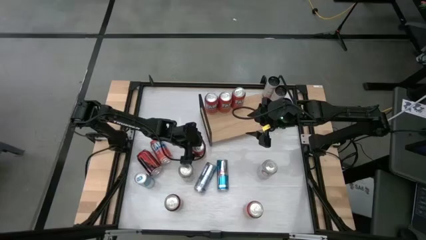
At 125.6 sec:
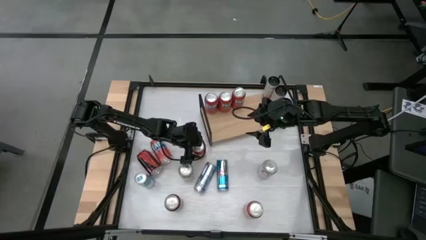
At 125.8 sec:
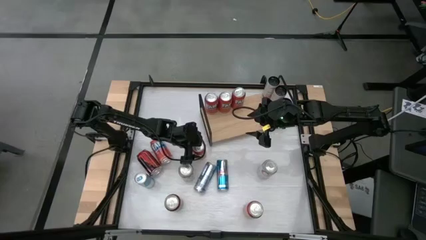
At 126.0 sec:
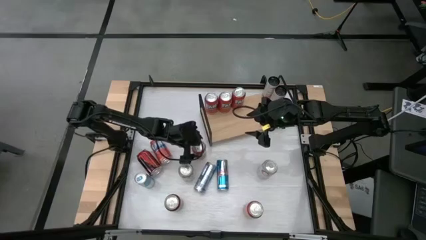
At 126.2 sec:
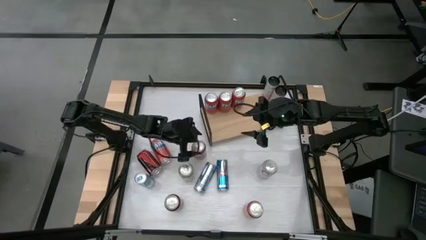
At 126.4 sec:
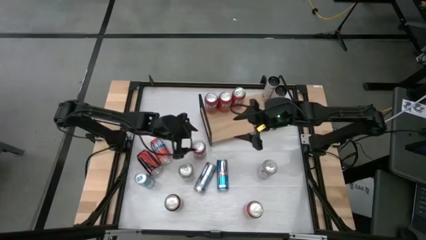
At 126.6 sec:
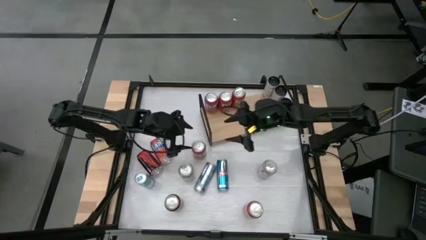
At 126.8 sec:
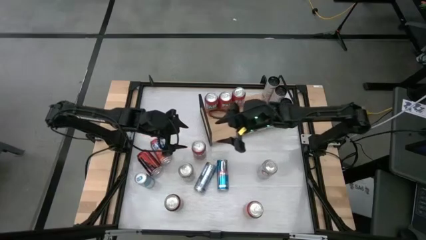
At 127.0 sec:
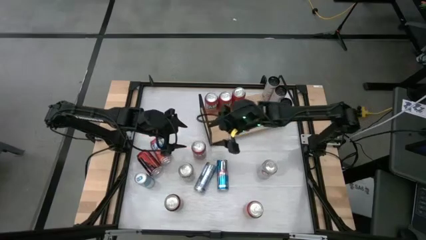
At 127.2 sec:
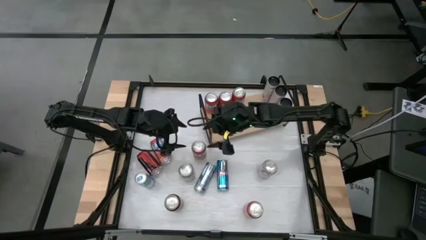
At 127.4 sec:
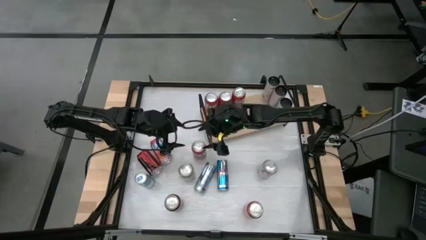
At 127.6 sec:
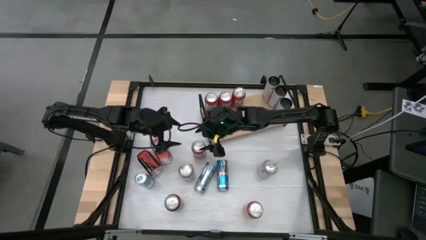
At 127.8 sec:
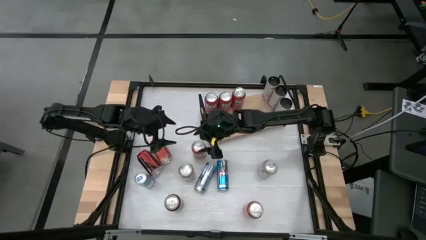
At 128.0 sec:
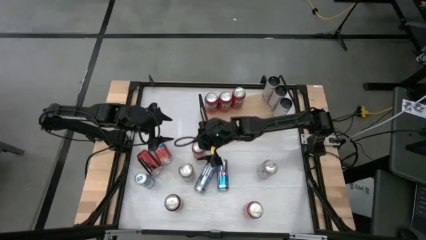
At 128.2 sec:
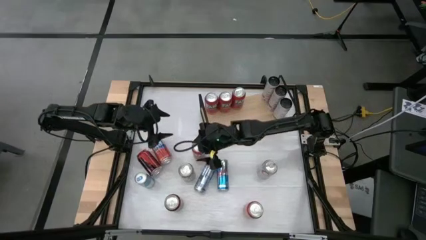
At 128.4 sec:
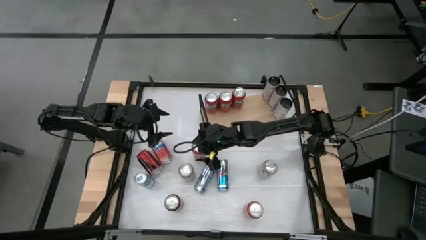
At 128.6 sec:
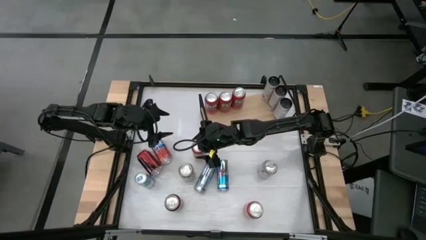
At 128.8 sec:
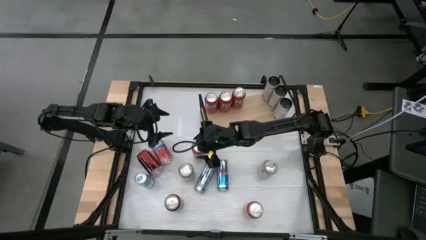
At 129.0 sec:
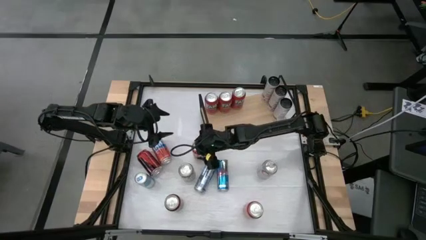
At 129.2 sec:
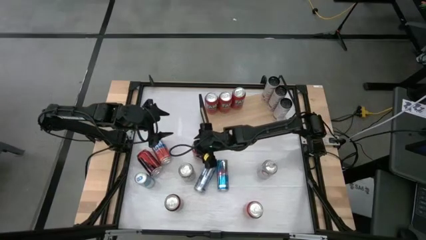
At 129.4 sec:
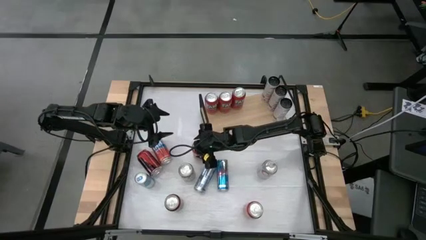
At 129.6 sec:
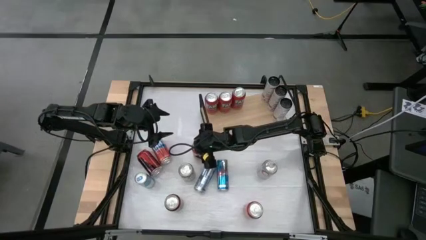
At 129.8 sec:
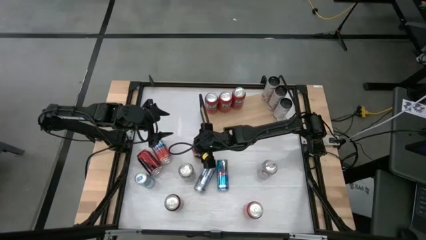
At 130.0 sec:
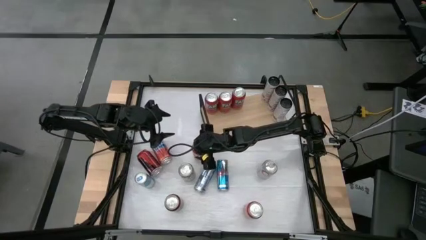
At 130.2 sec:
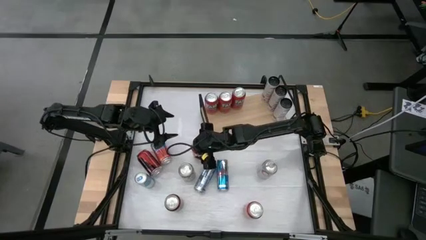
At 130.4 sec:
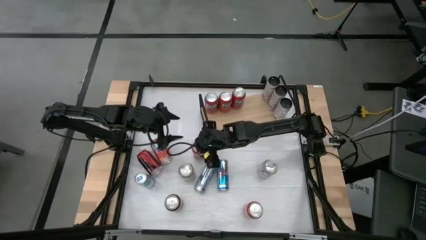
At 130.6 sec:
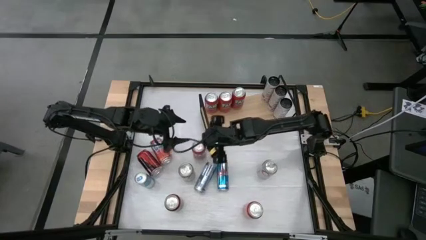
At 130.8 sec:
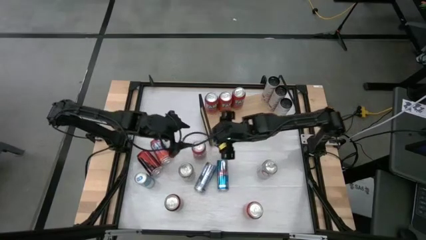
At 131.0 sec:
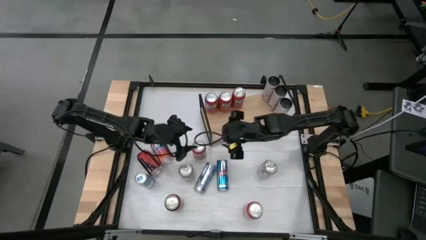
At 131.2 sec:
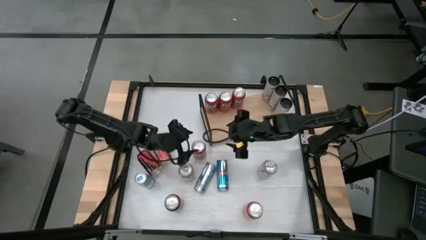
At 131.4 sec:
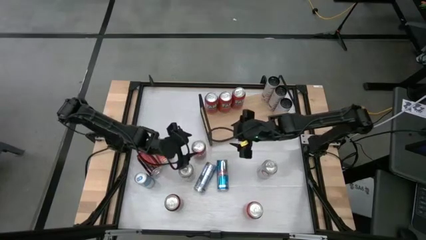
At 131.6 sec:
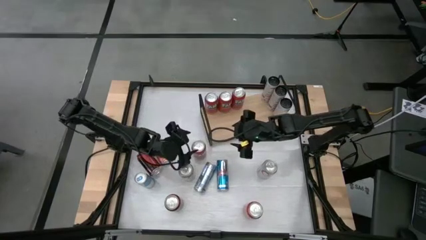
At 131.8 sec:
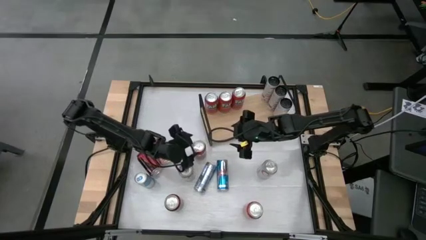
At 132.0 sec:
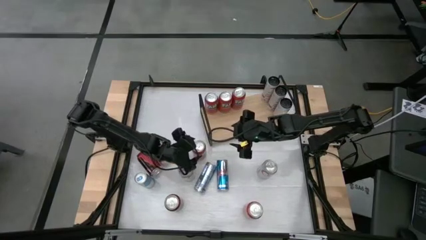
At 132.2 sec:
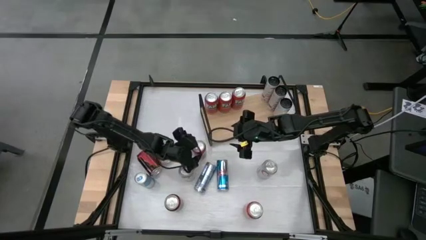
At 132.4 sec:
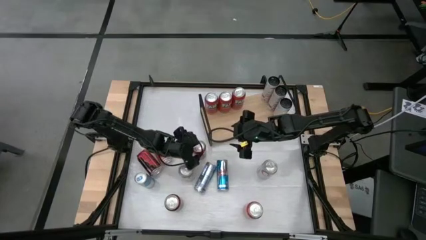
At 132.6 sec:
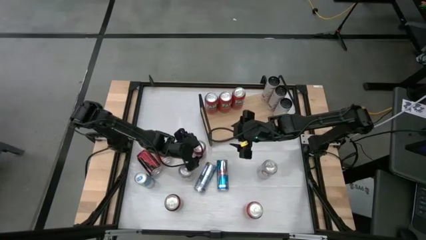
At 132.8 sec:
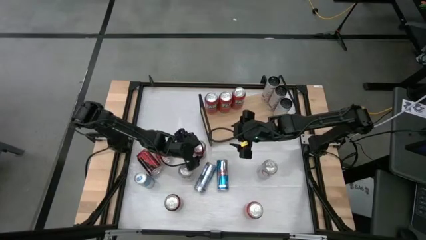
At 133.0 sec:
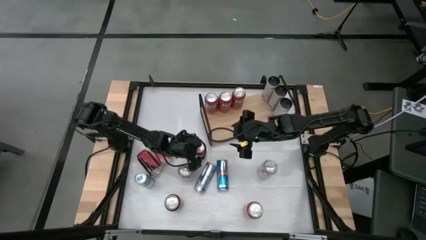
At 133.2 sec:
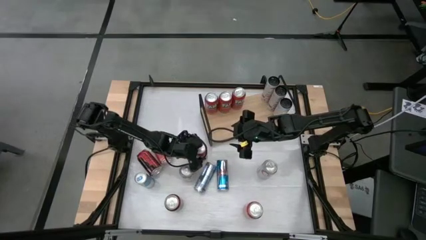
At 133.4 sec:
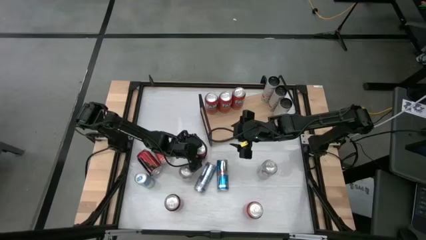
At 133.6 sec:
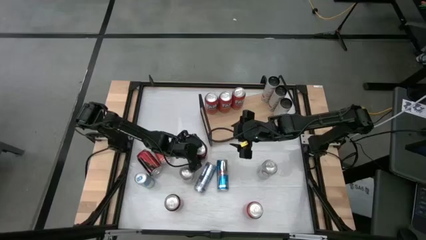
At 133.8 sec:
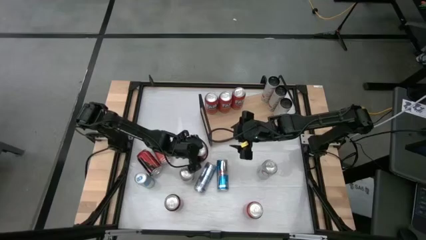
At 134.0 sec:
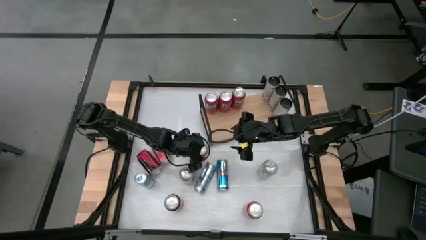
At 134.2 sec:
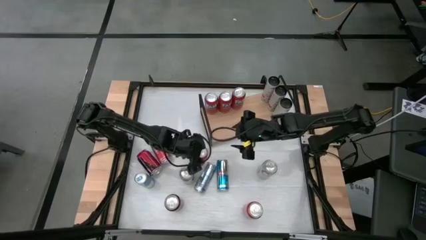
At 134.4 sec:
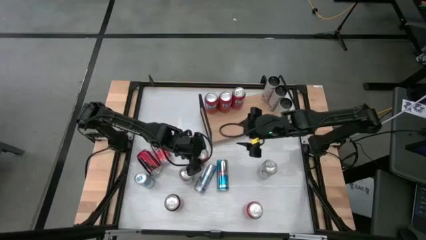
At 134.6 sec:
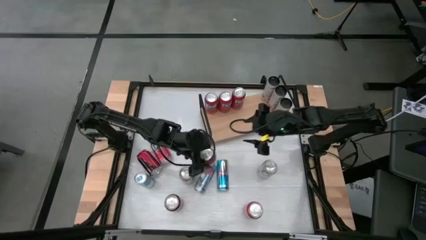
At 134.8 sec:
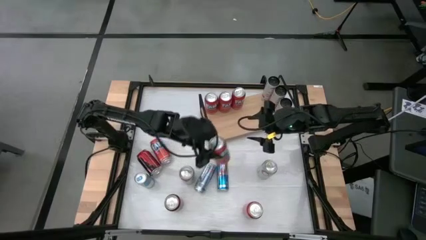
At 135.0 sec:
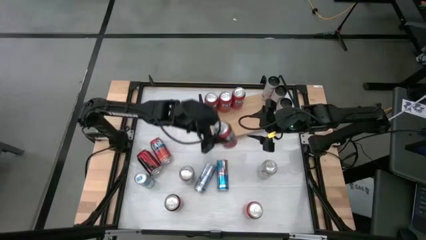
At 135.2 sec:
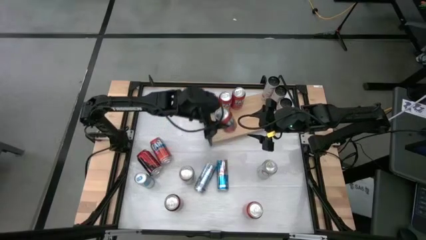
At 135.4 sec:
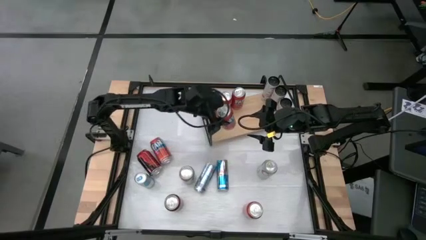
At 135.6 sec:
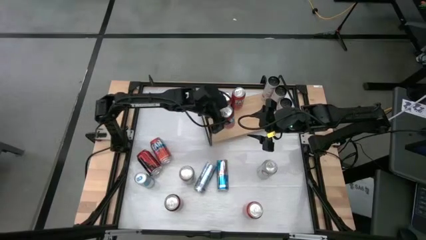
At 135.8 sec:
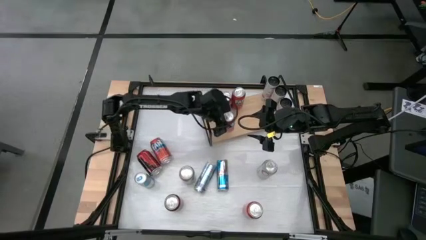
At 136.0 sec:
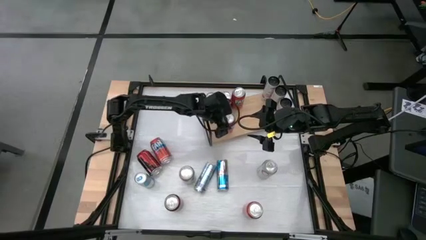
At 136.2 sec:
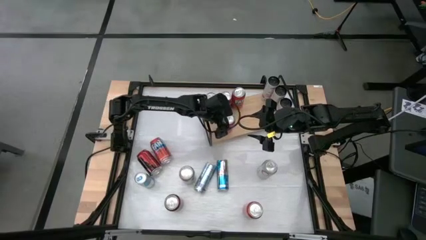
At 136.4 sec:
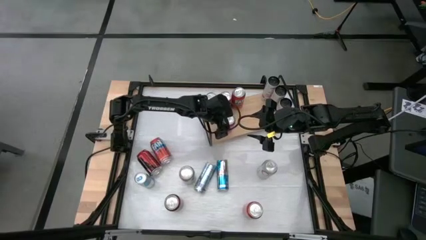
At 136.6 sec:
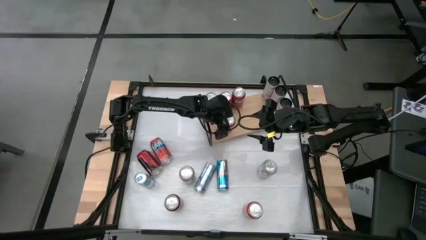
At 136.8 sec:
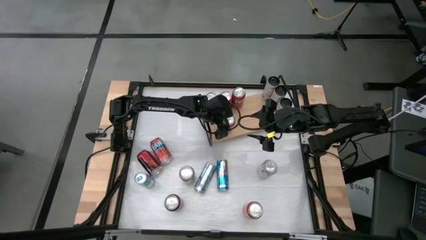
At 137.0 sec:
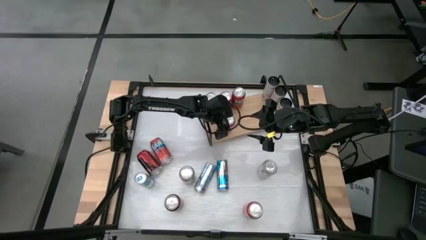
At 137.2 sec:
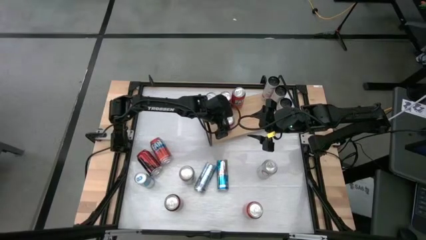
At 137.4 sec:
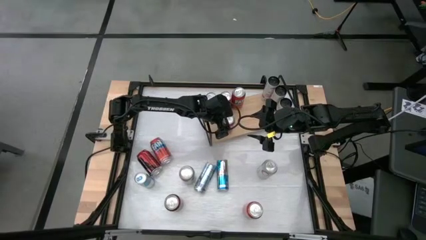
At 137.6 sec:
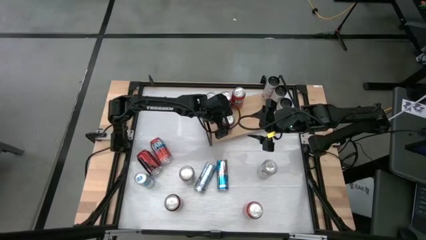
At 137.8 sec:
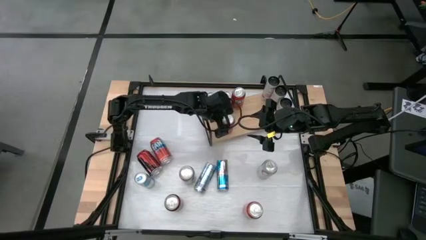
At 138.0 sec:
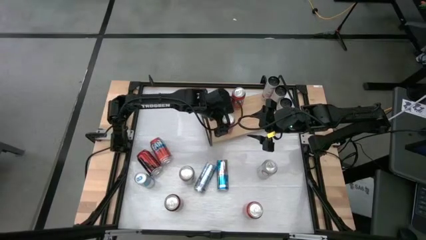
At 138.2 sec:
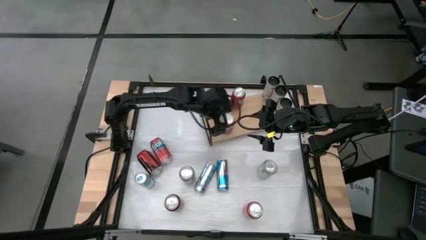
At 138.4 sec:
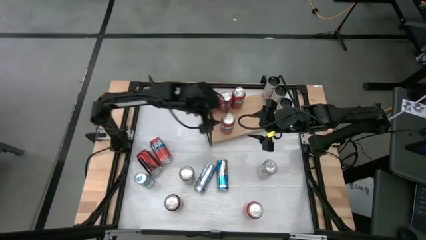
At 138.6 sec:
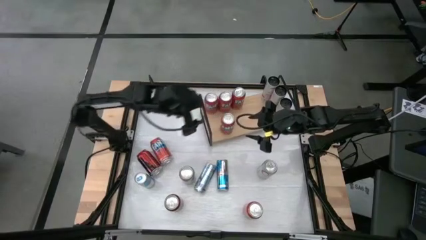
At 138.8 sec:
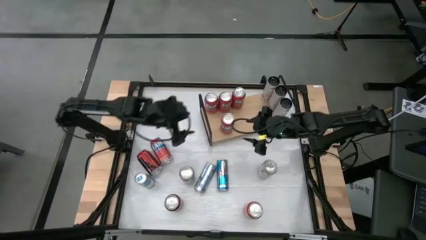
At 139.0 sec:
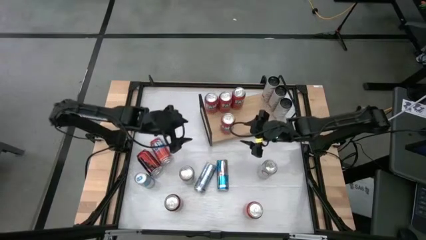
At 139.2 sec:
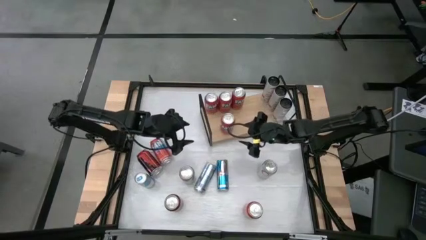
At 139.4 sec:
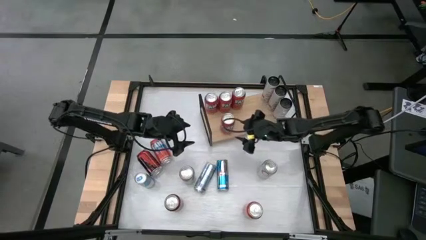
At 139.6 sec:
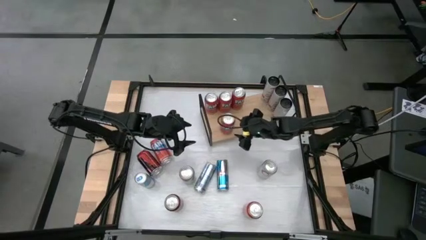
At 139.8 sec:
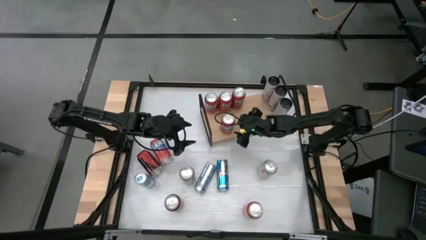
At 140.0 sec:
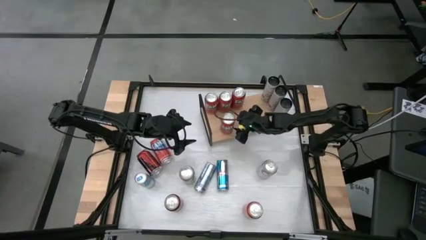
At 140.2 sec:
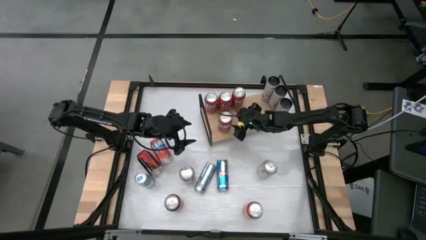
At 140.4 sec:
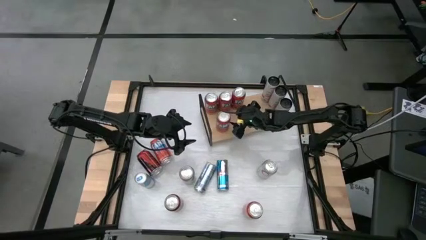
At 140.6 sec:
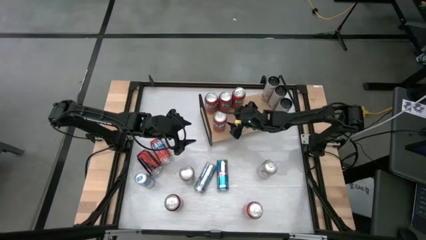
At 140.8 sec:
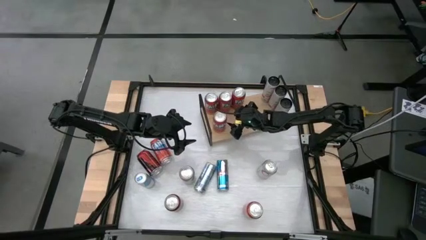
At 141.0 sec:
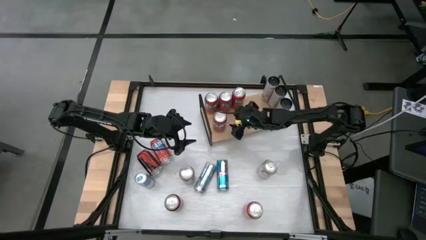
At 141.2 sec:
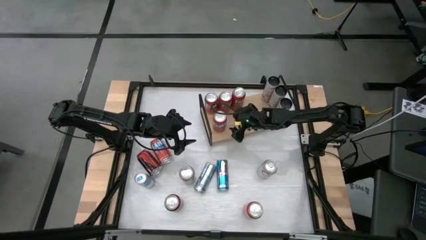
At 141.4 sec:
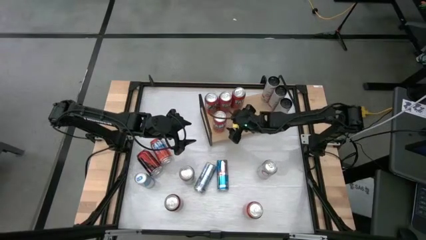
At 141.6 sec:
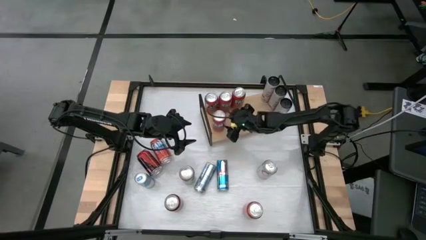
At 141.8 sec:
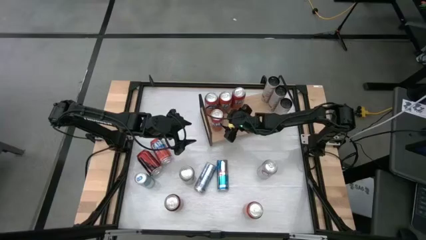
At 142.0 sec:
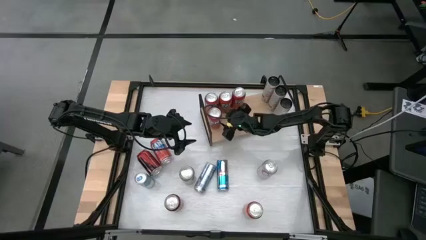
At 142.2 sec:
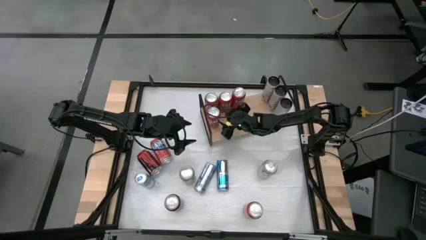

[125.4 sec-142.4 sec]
Task: Place canned beverage on shelf
Put the center orange soda can on the shelf
